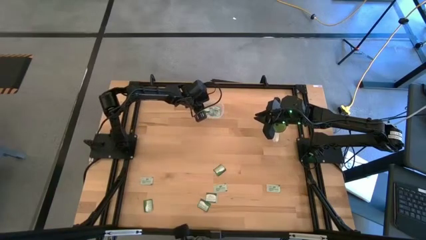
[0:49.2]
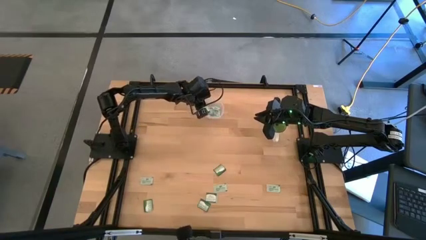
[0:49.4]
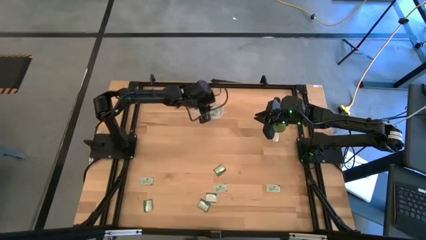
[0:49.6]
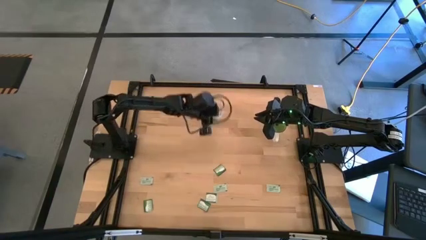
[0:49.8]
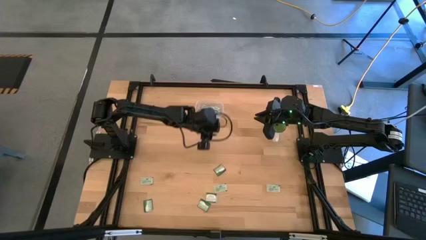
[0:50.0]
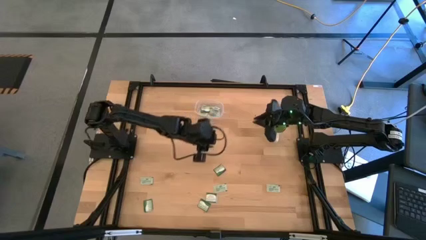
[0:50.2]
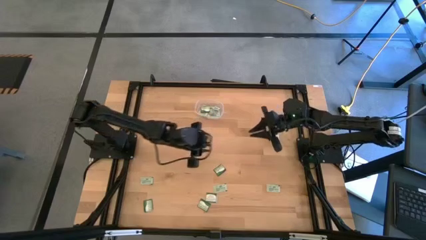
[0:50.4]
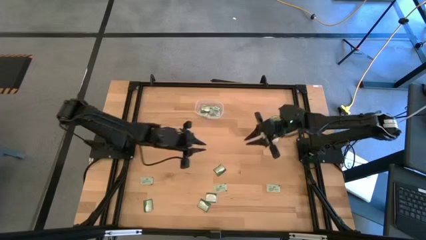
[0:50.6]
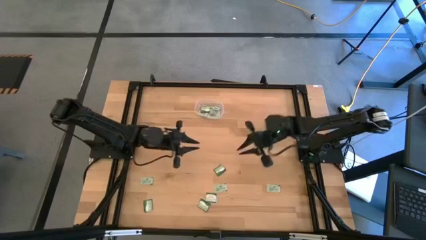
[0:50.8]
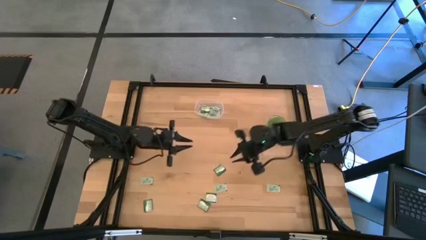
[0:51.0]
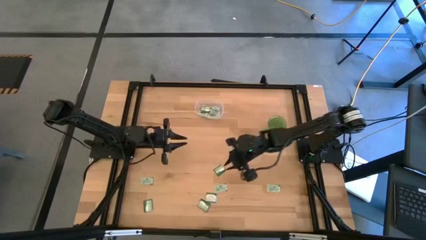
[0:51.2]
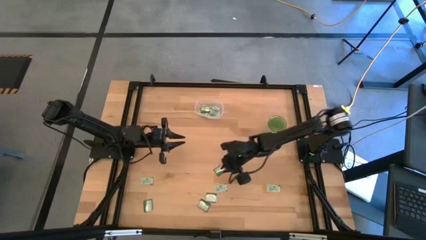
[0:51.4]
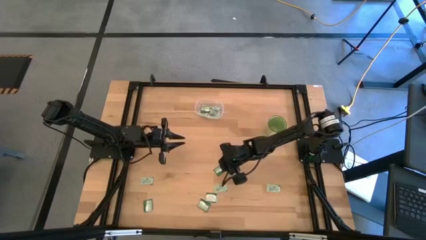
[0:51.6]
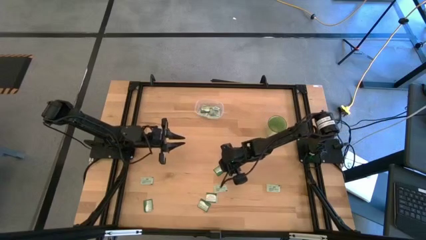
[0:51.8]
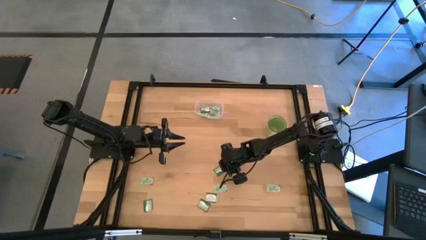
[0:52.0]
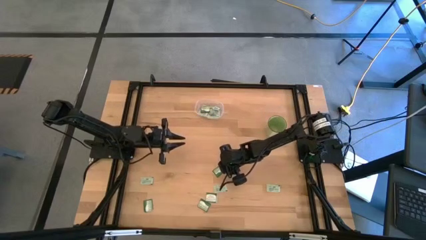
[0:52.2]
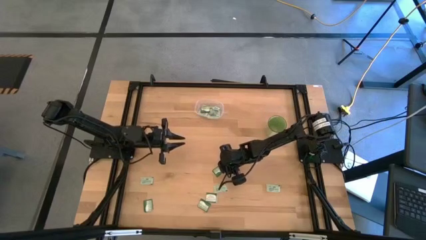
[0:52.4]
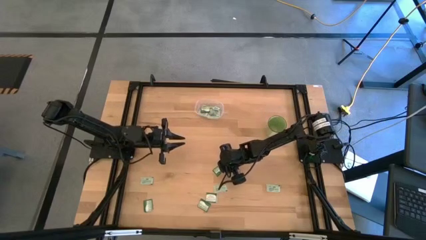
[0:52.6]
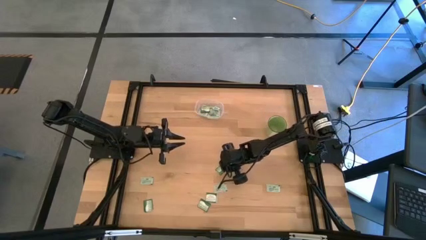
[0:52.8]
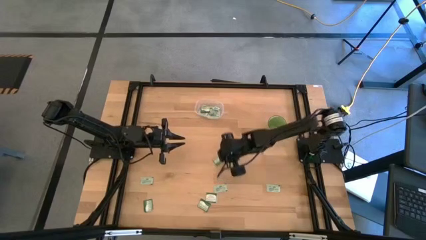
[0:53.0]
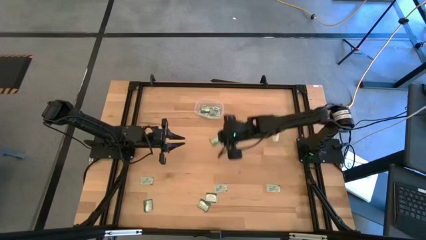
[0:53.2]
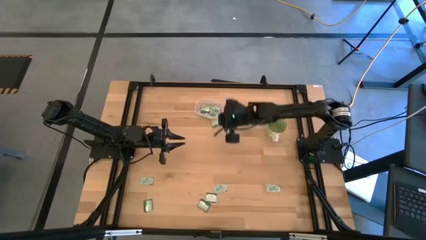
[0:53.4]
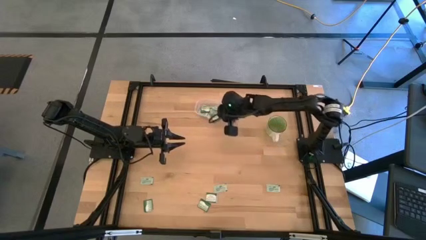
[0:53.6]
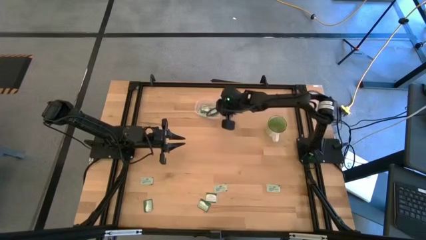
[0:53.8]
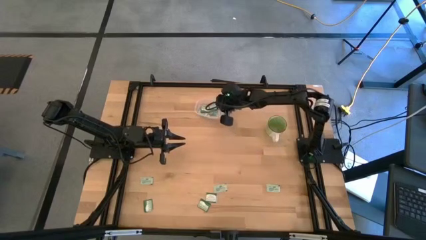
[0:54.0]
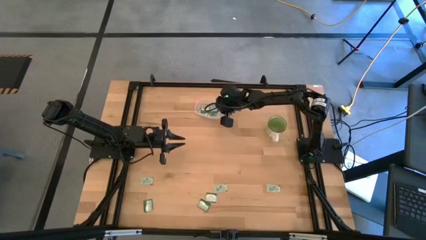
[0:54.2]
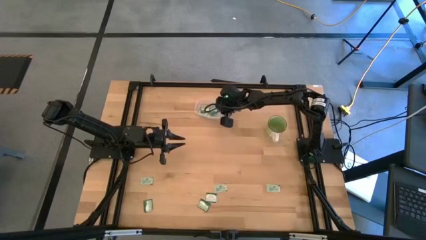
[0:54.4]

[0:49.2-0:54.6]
Task: Pick and place items into bin
Put the white stevia packet into the bin

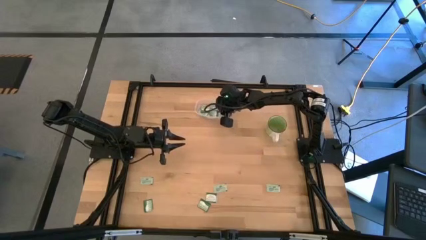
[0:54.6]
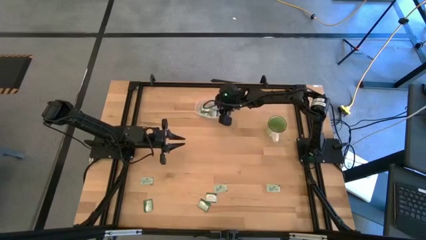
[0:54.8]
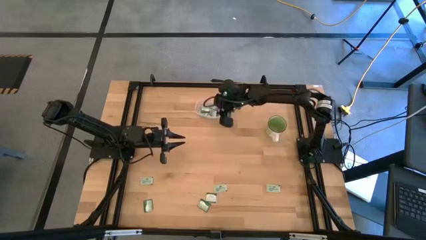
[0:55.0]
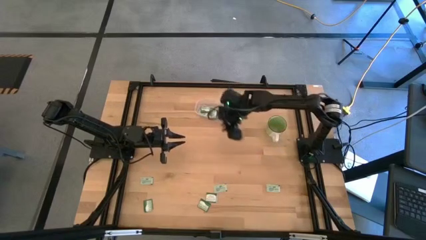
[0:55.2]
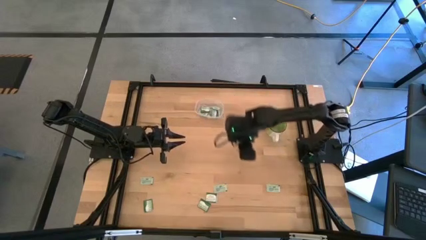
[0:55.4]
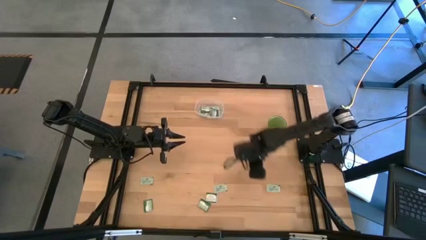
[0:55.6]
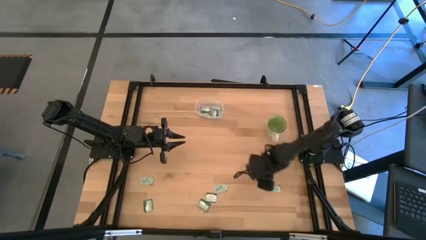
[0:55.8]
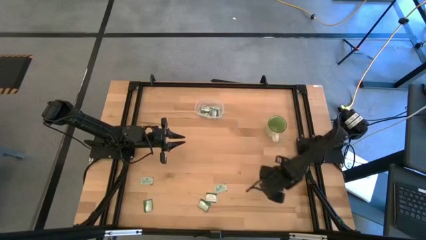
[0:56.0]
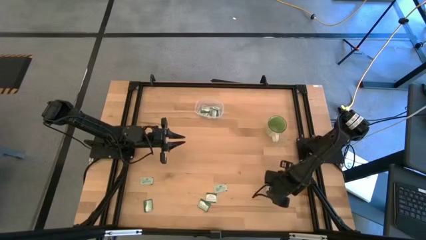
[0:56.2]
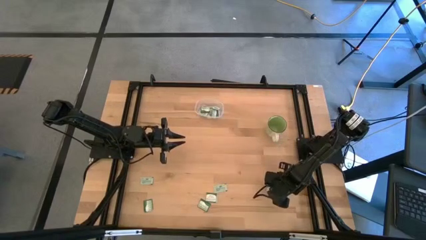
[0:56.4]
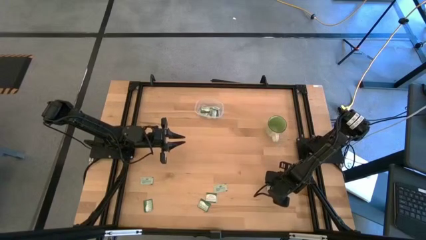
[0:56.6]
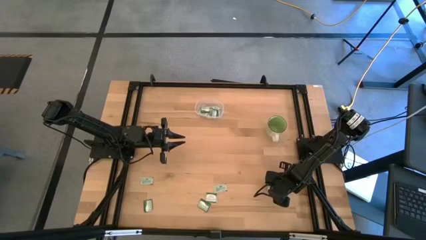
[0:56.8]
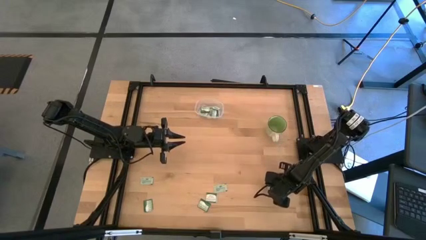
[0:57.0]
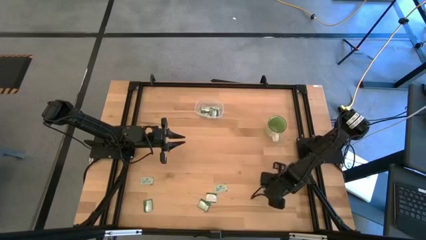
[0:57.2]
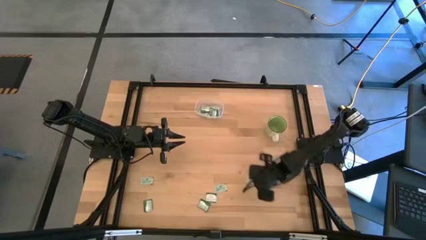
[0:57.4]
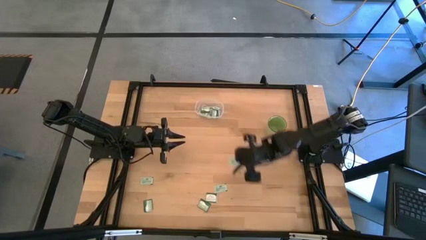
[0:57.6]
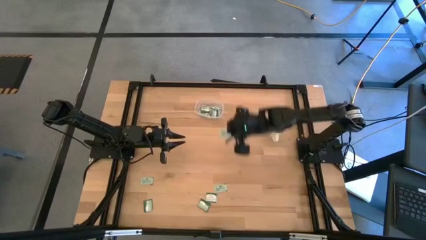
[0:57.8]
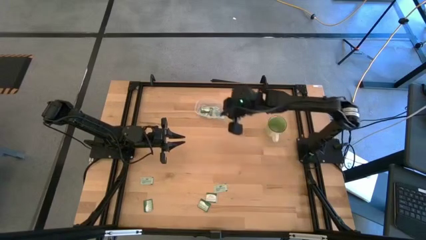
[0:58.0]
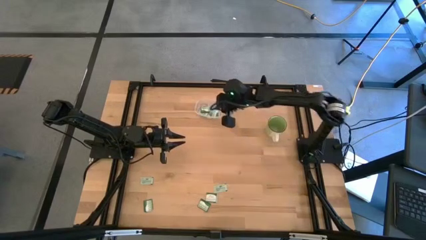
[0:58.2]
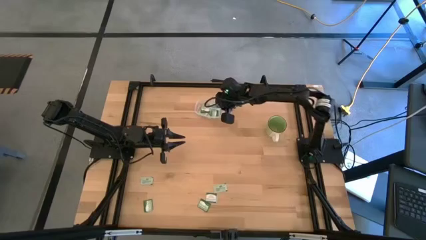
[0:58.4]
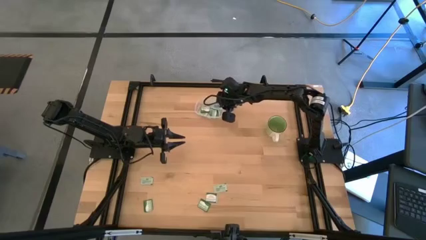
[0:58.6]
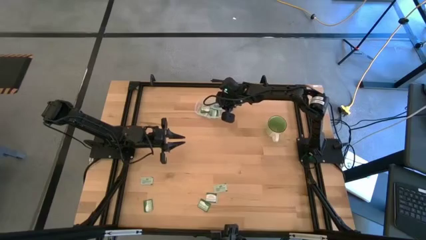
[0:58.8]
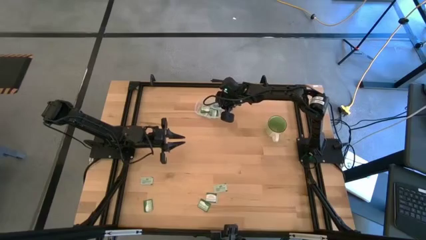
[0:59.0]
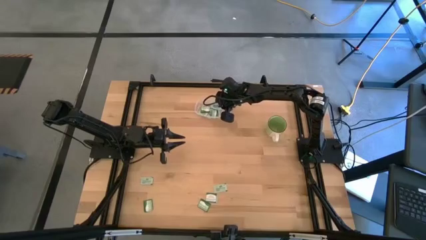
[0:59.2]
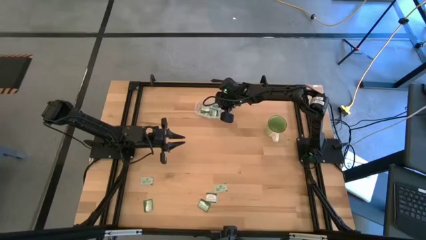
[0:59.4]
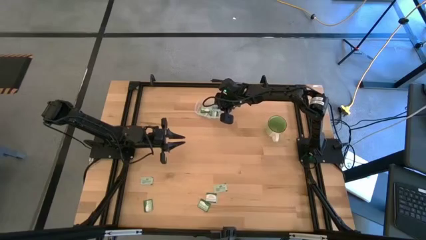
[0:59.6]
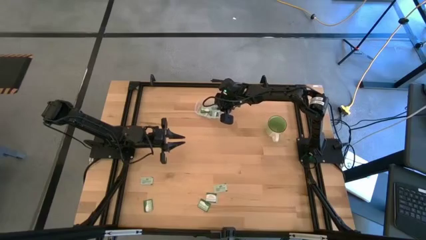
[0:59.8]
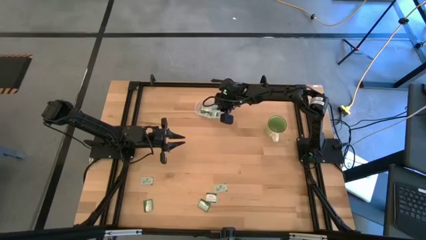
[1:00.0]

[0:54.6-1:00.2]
Put the right green stevia packet into the bin

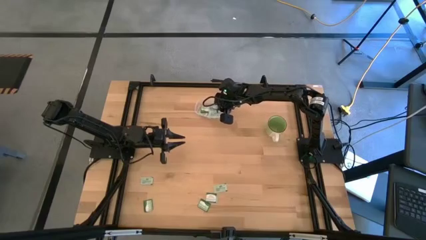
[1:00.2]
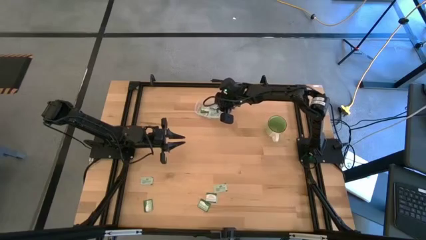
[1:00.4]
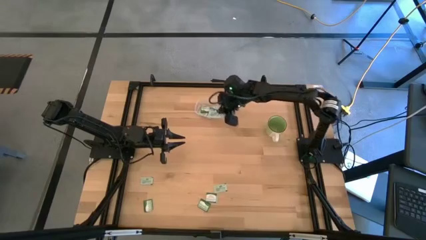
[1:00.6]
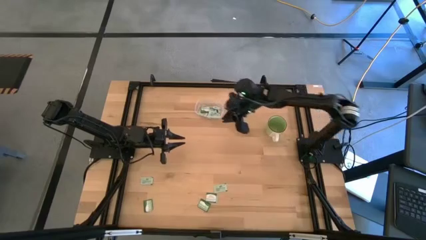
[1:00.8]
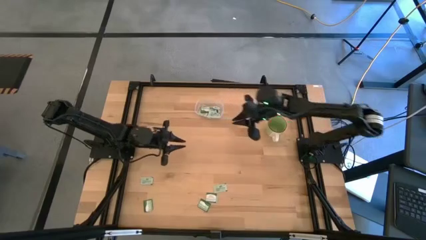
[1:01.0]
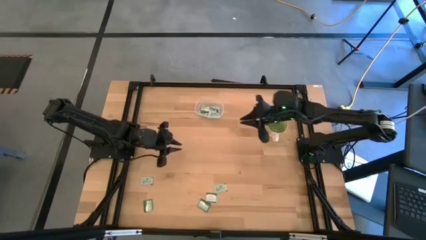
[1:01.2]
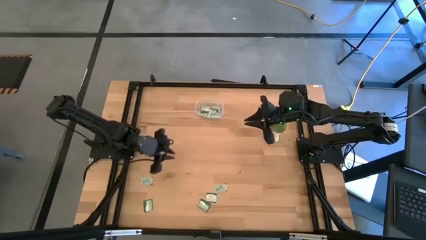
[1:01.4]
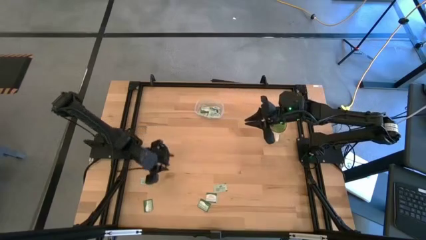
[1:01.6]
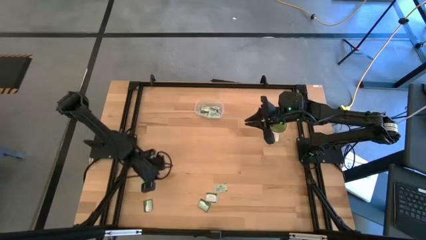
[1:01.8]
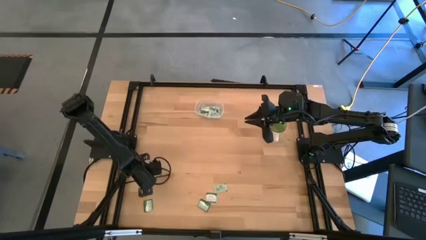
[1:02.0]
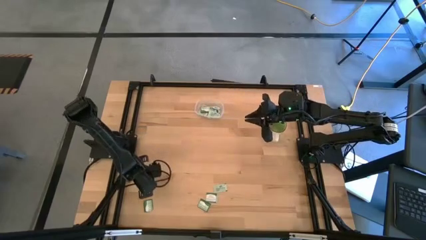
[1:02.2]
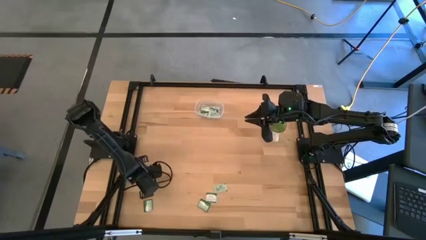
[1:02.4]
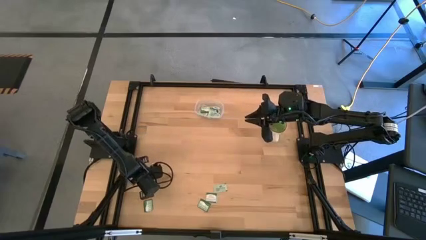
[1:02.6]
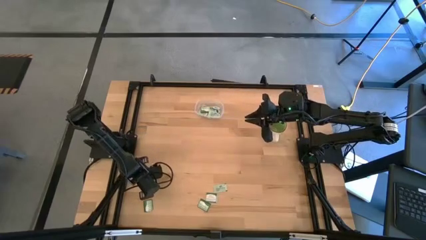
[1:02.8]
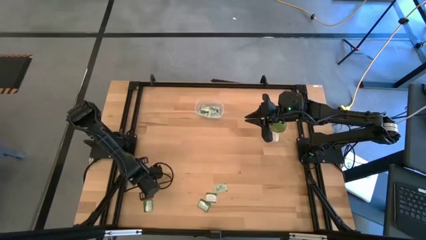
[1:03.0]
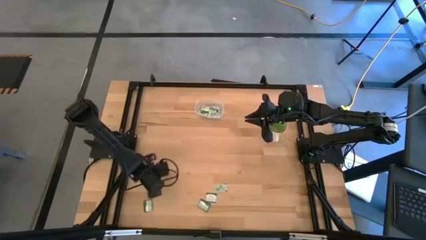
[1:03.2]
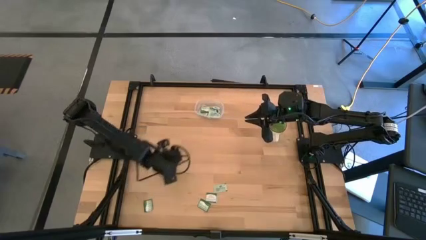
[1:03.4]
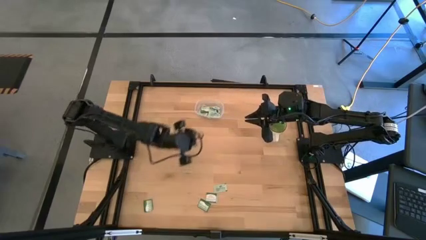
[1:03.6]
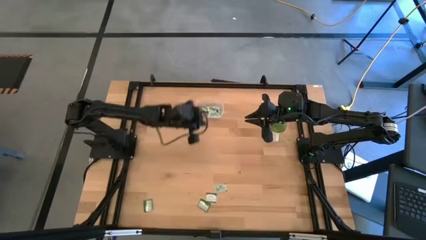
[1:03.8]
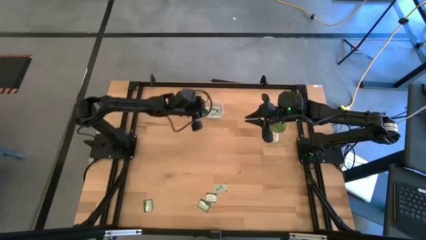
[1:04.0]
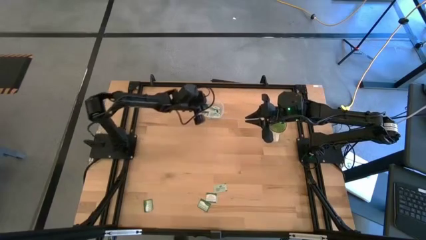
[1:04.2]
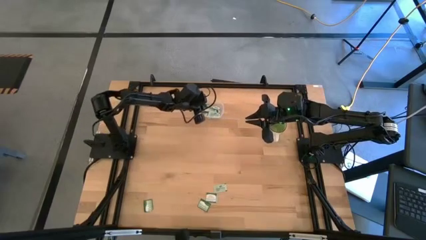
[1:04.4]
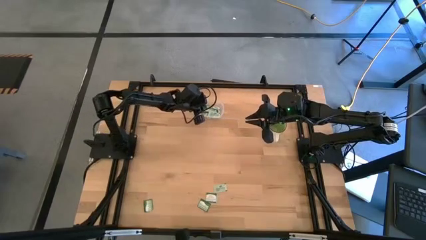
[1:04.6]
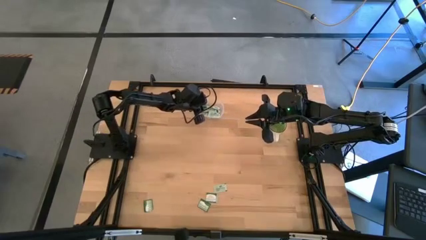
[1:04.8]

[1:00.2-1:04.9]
Put the left green stevia packet into the bin
